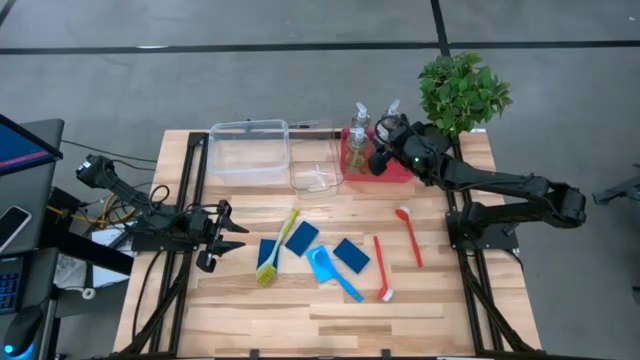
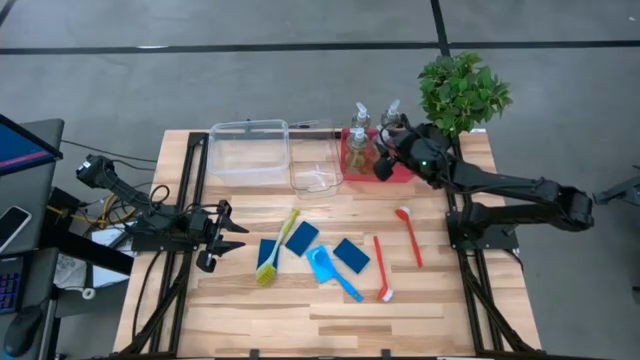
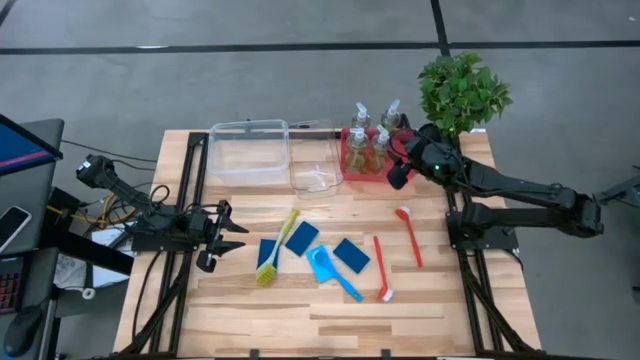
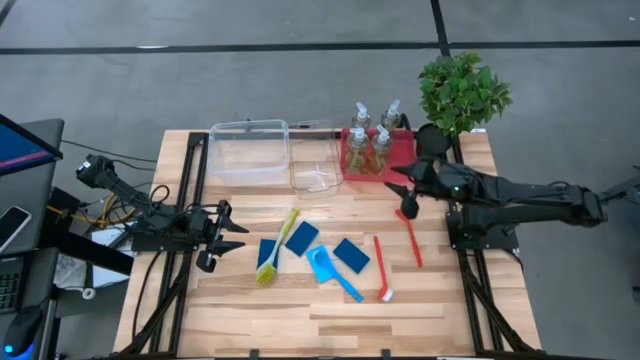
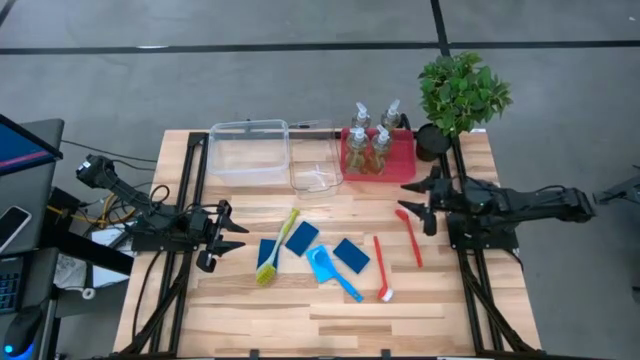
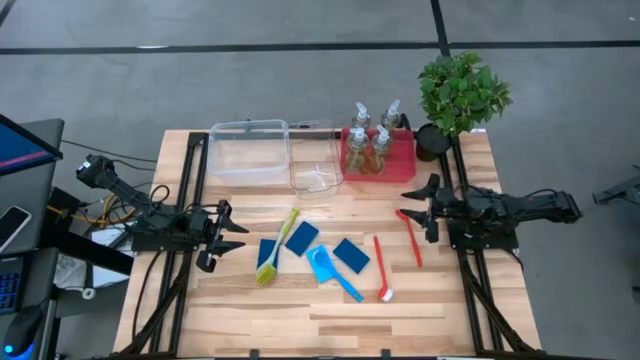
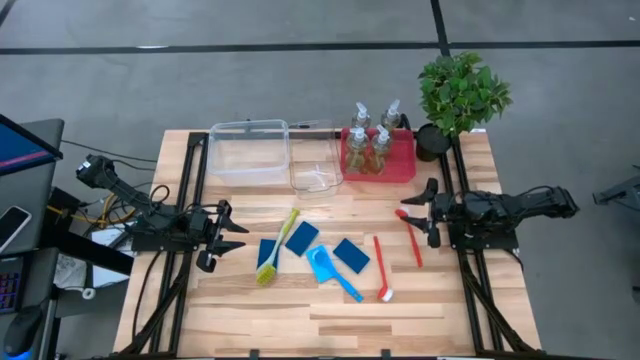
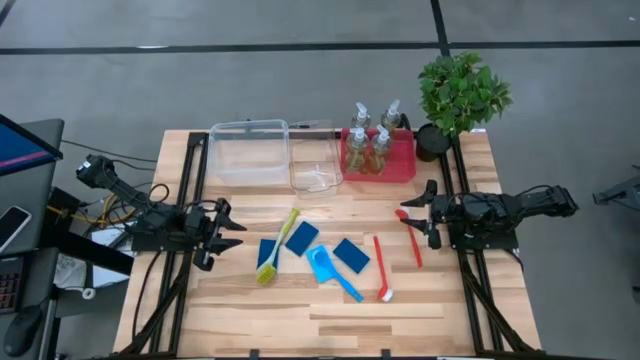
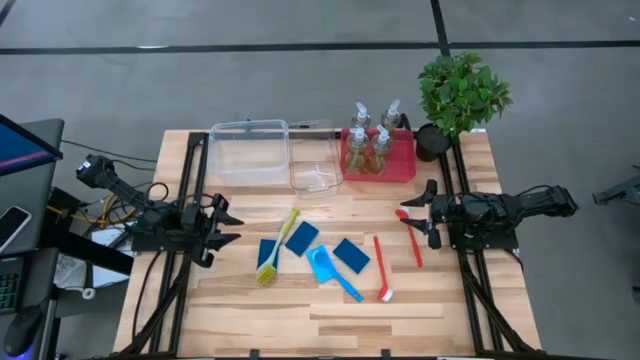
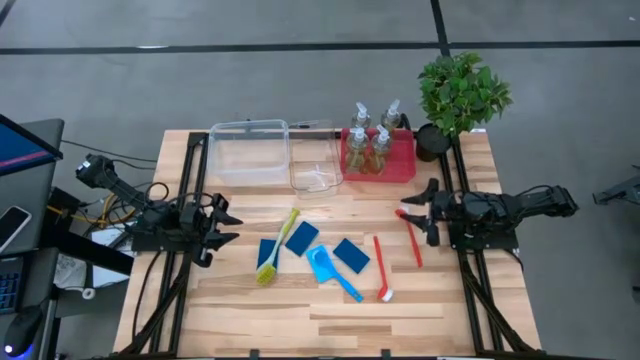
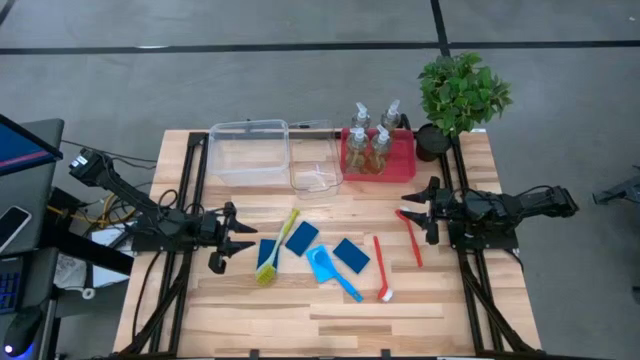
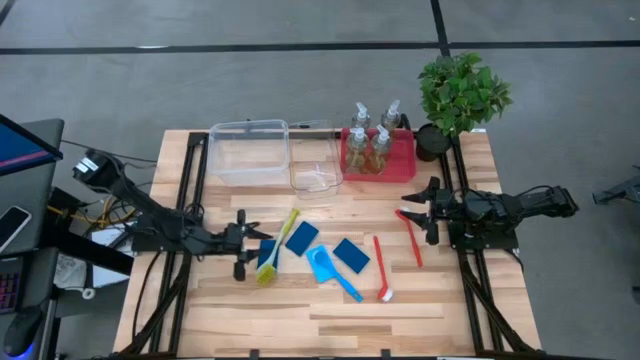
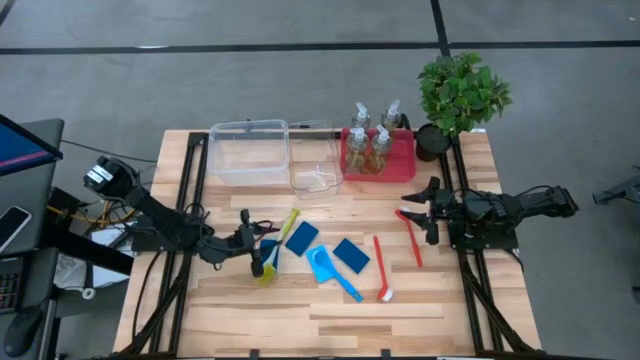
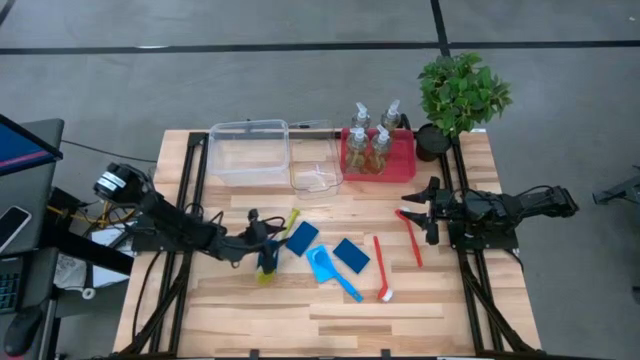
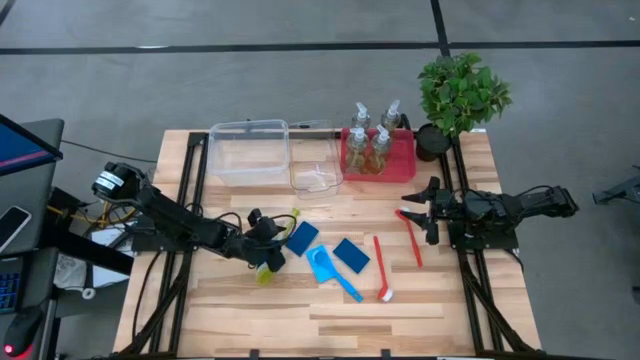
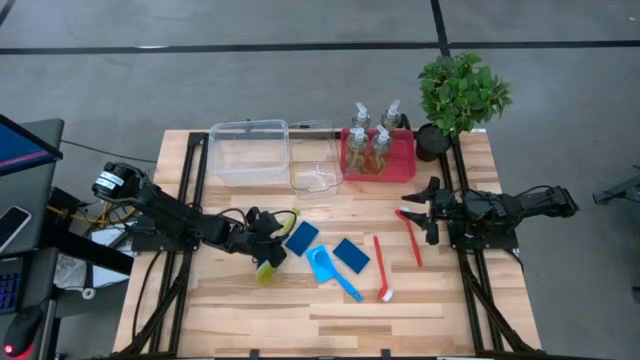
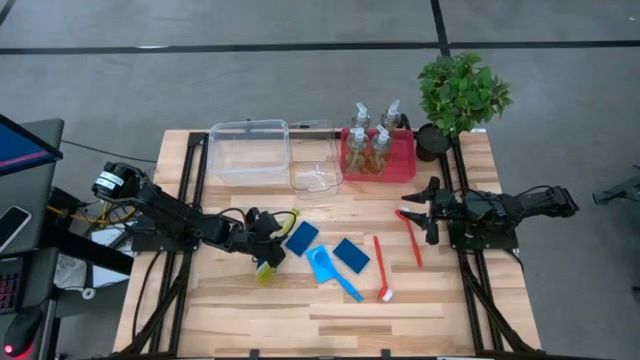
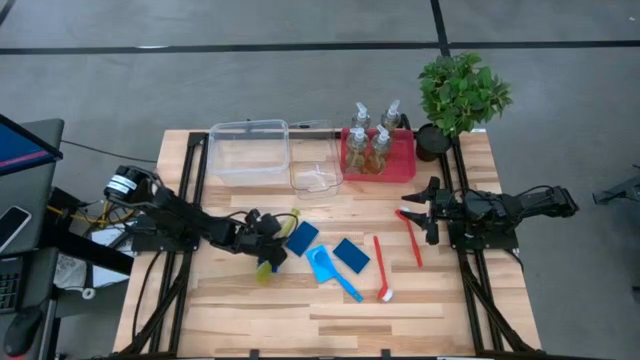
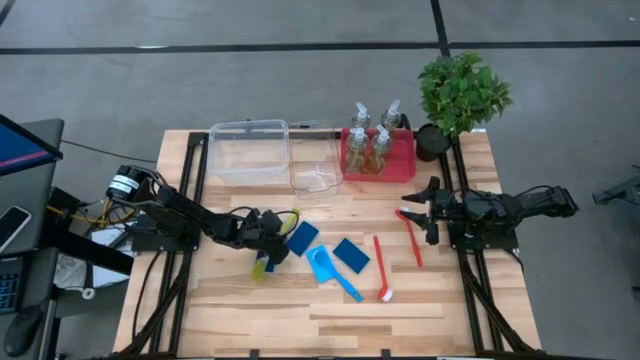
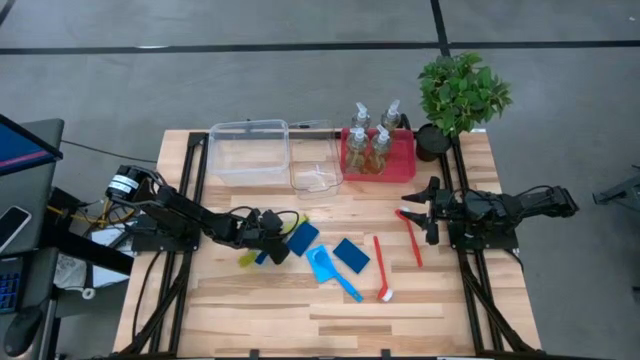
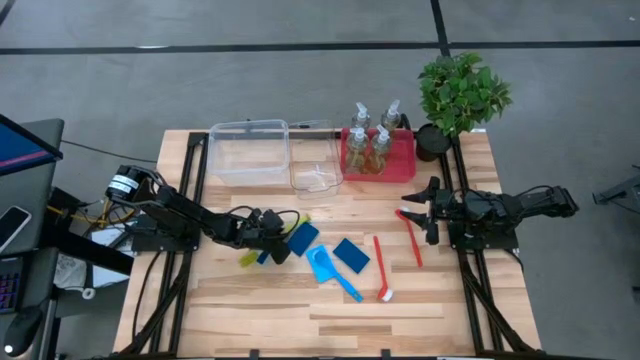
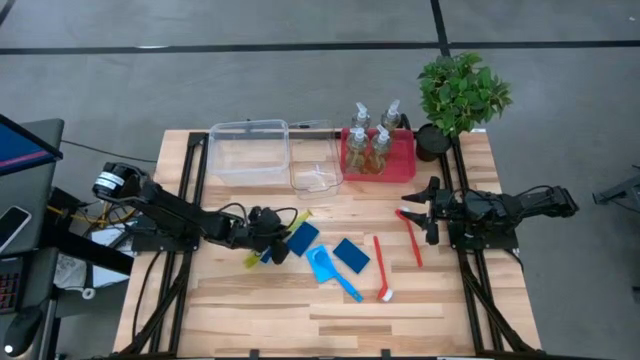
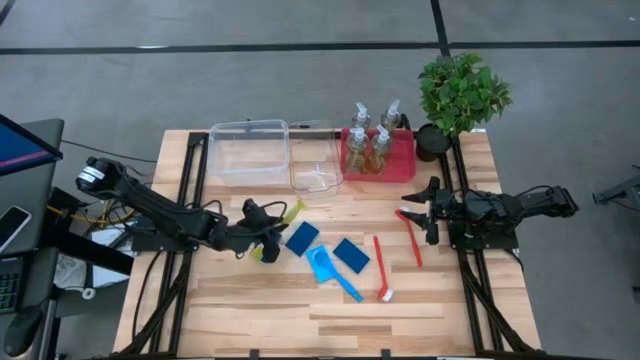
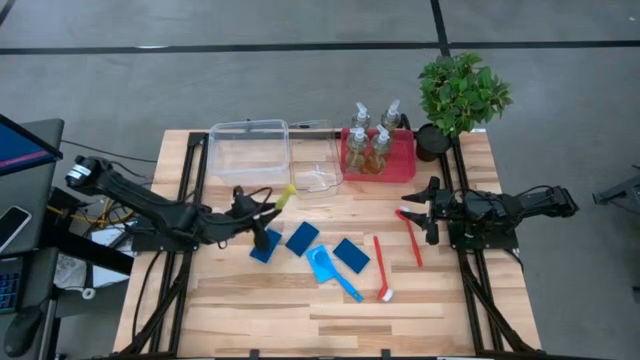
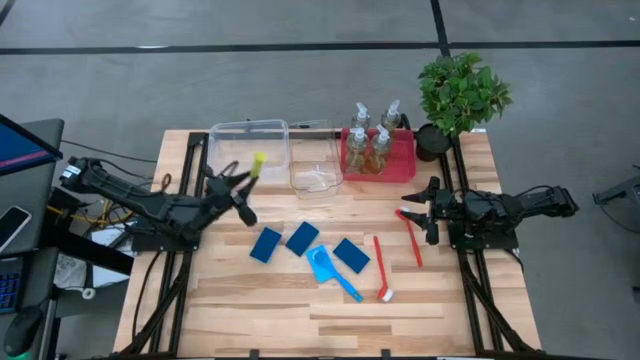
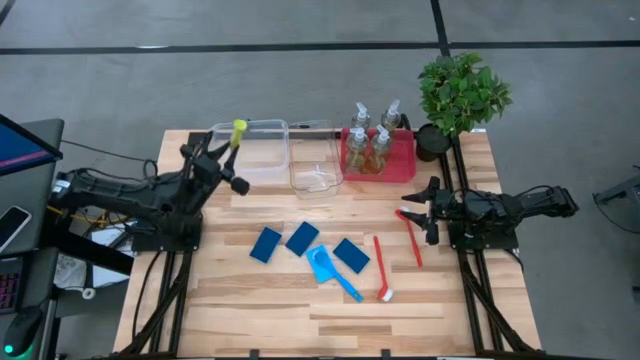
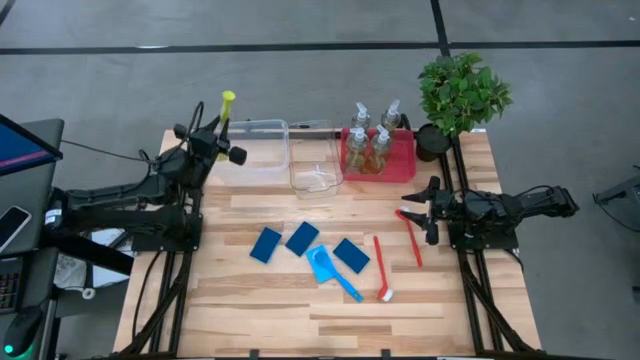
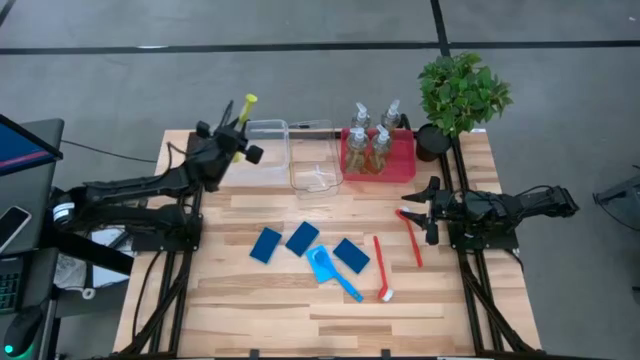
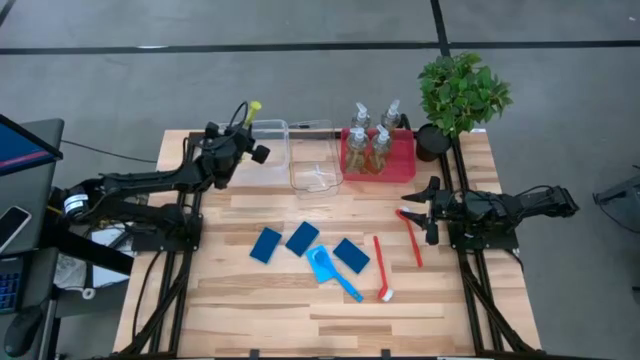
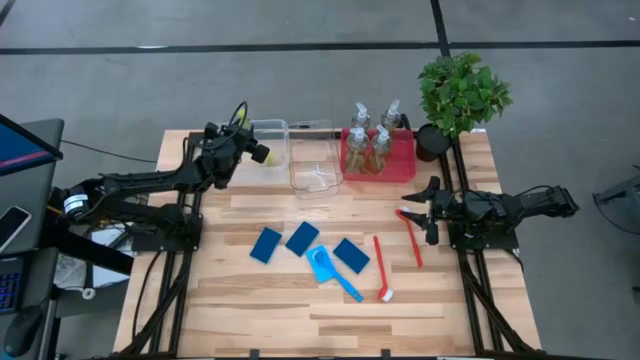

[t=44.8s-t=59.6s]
Task: Pick & Place Kitchen Sink Supplies
Put the green dish brush into the white bin

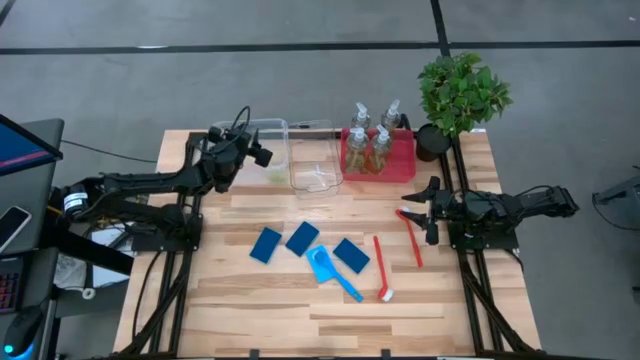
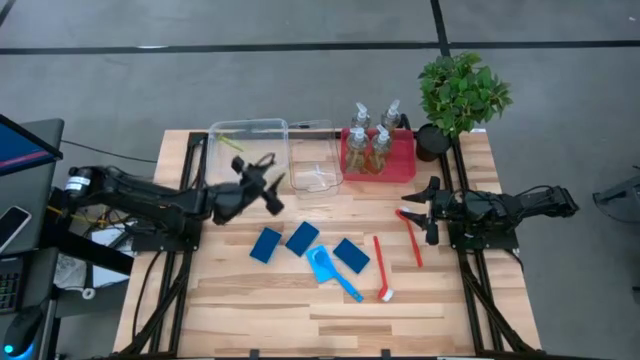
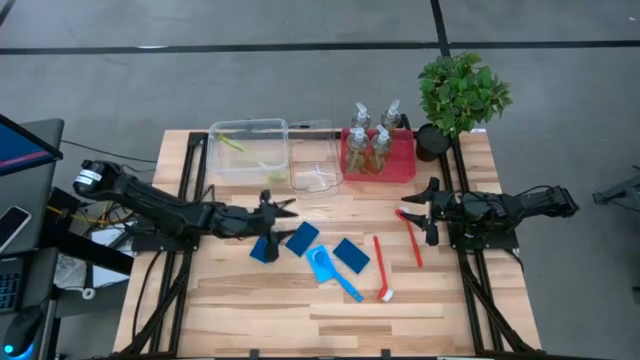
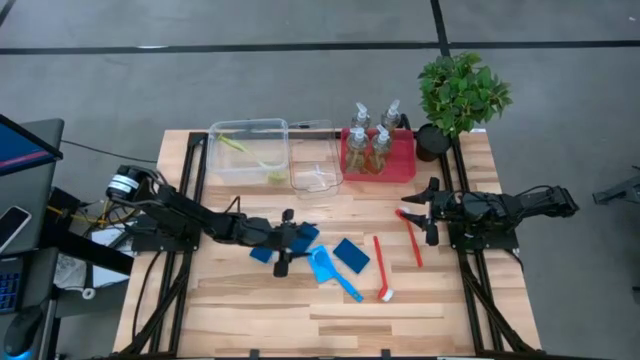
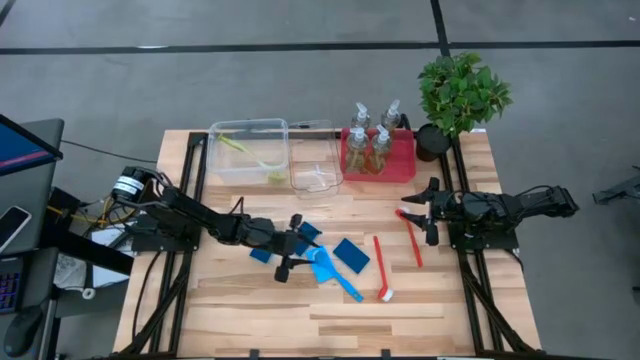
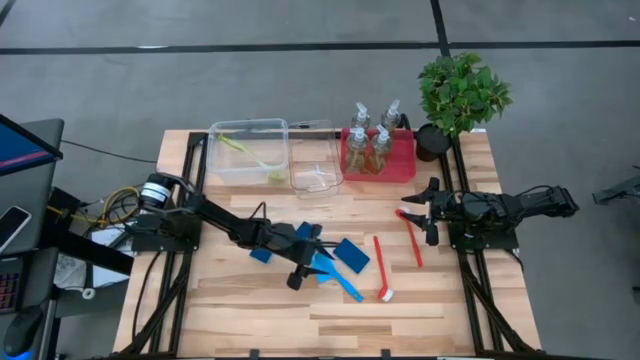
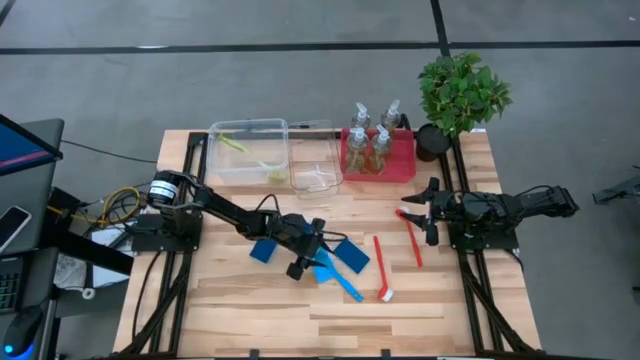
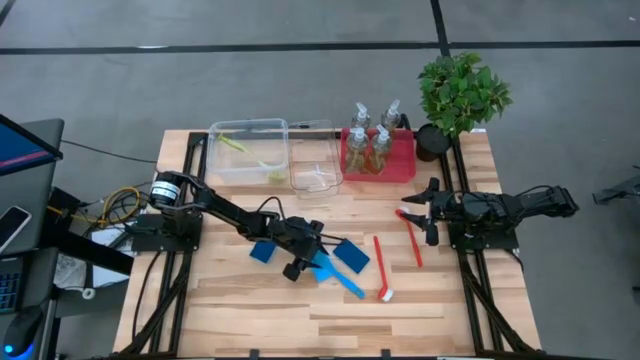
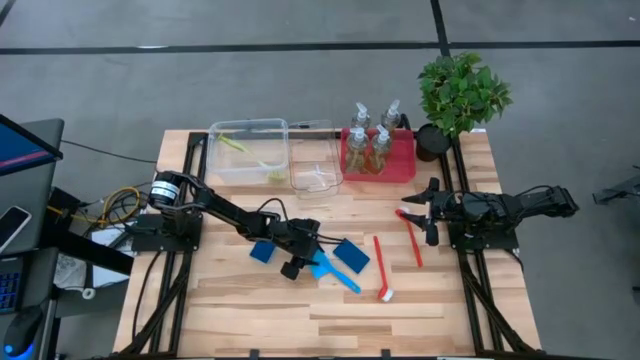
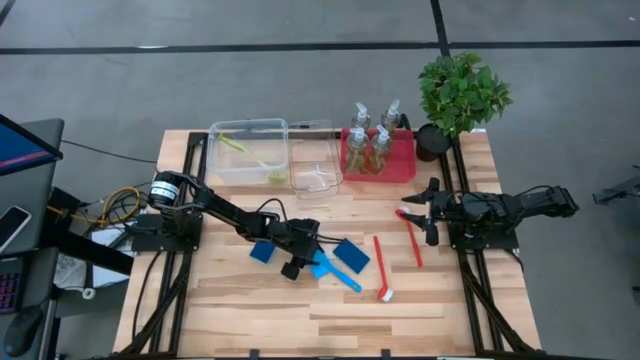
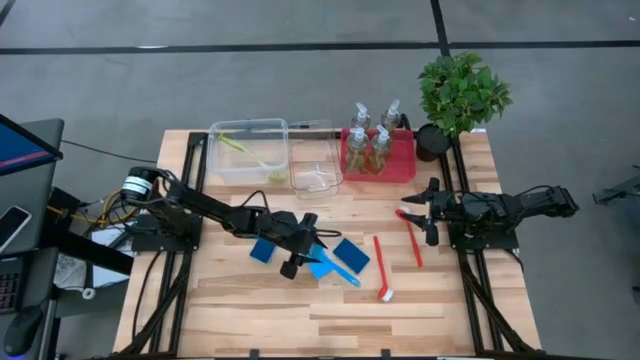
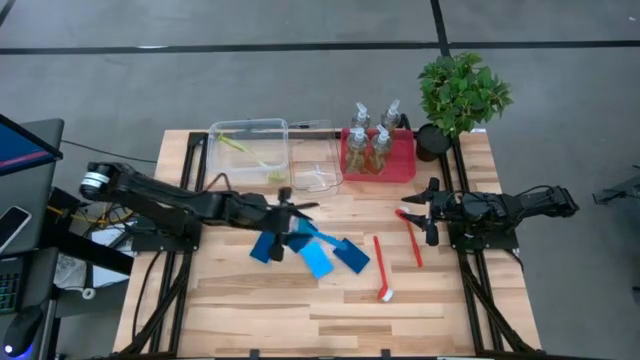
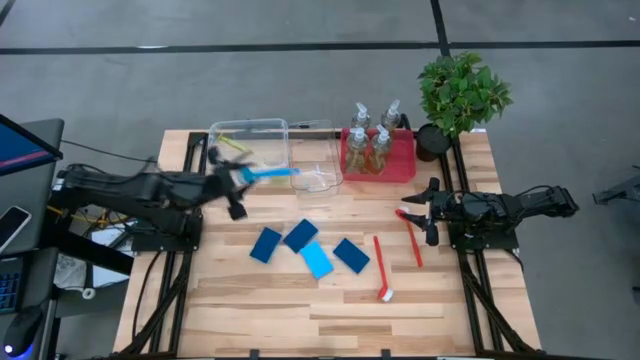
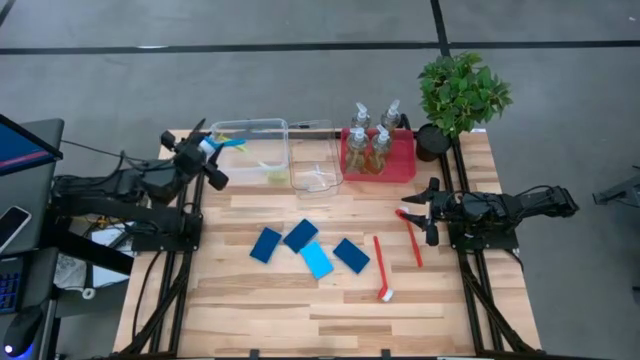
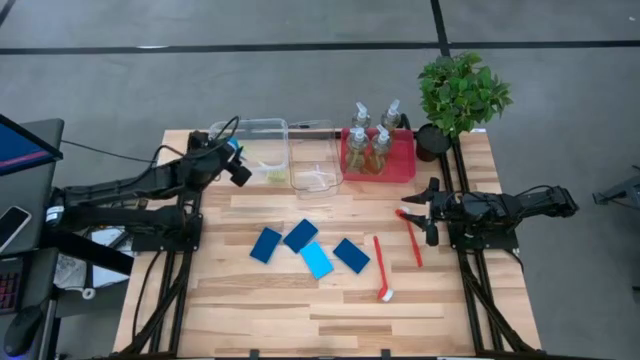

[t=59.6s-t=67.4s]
Put the blue dish brush into the white bin
